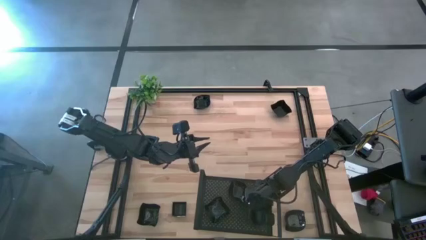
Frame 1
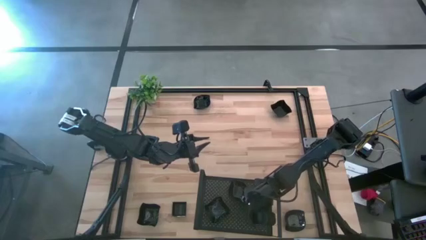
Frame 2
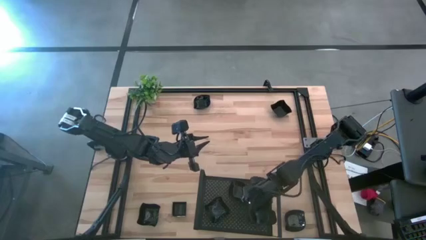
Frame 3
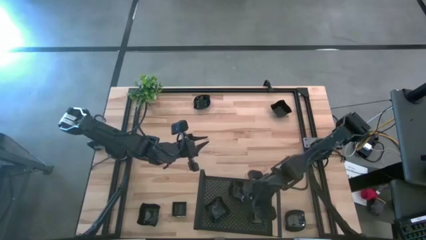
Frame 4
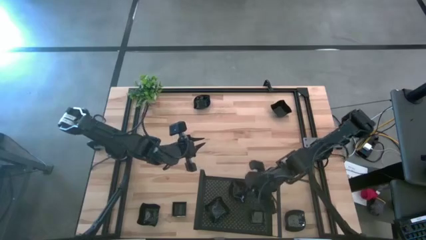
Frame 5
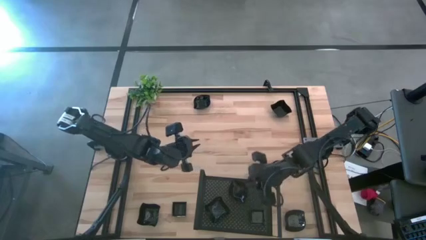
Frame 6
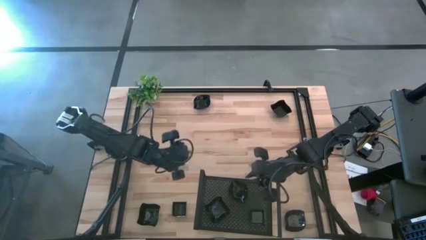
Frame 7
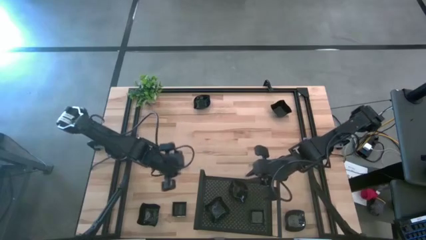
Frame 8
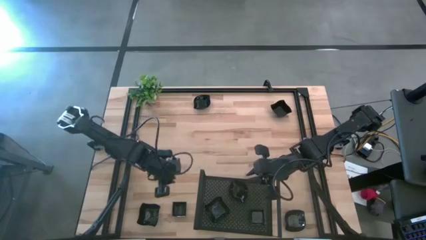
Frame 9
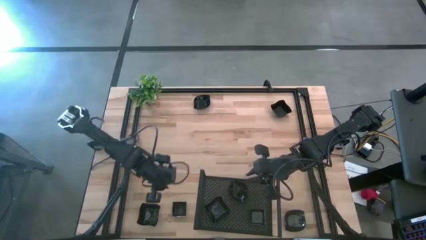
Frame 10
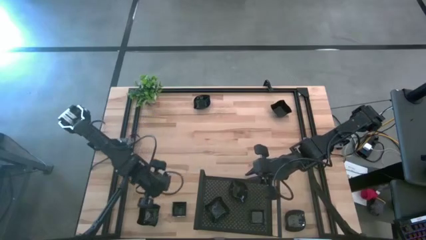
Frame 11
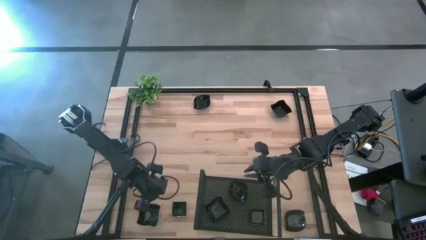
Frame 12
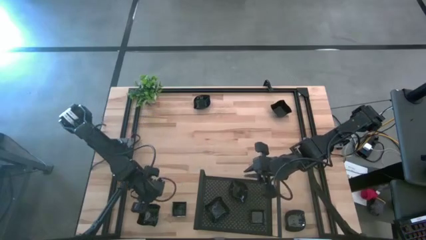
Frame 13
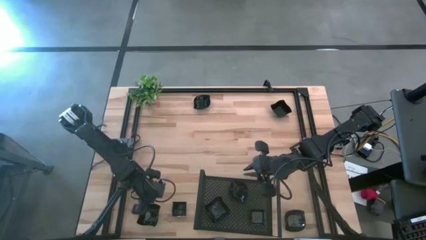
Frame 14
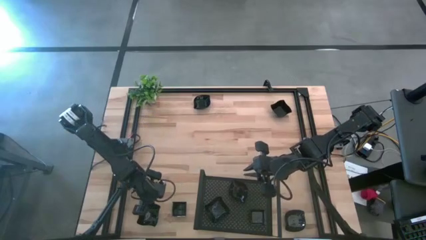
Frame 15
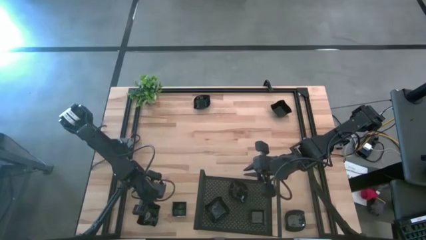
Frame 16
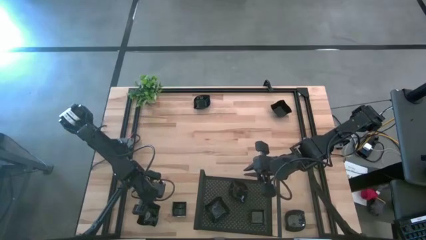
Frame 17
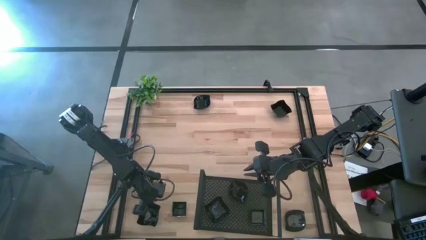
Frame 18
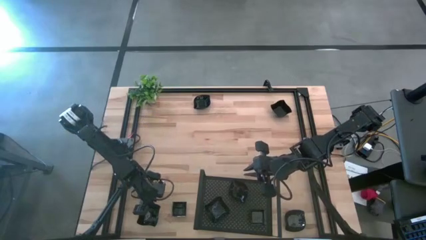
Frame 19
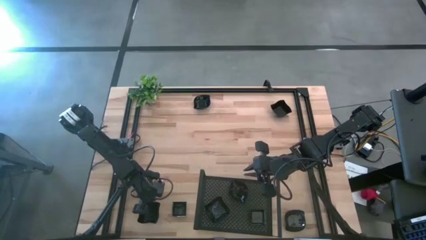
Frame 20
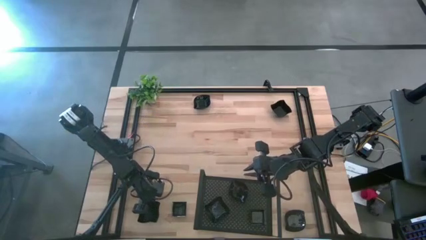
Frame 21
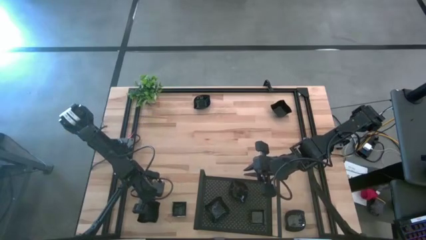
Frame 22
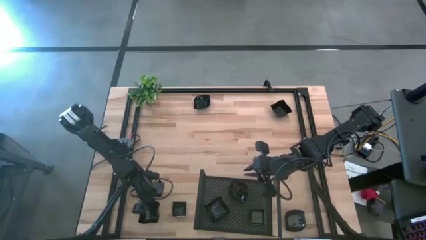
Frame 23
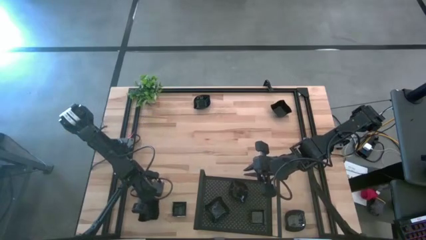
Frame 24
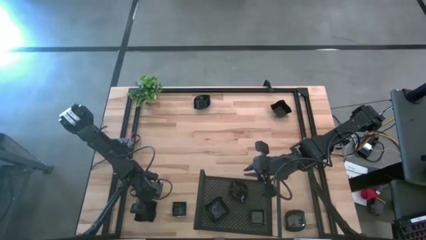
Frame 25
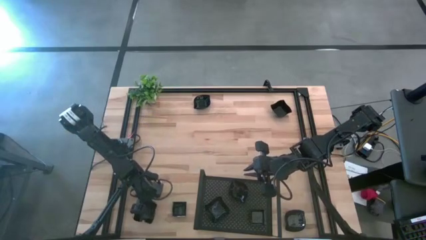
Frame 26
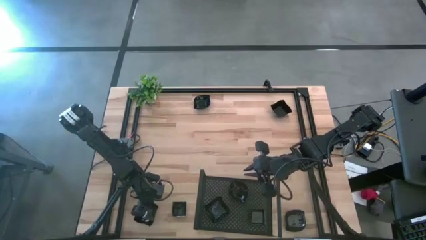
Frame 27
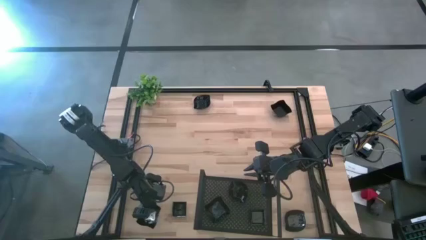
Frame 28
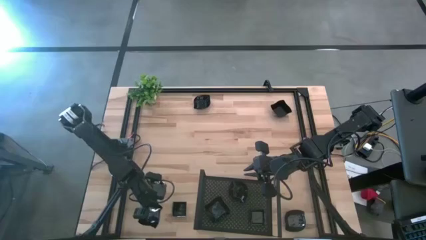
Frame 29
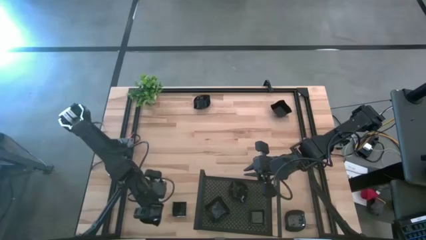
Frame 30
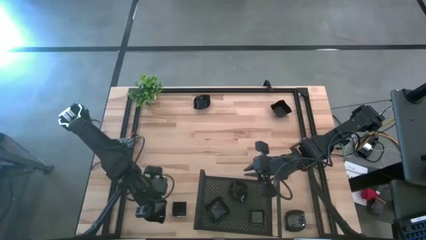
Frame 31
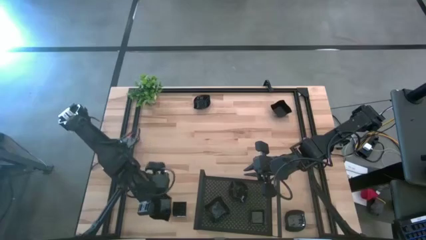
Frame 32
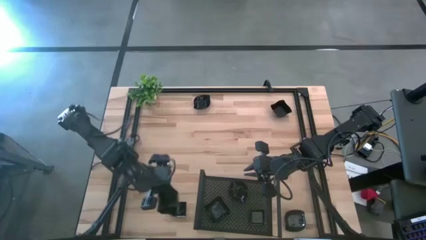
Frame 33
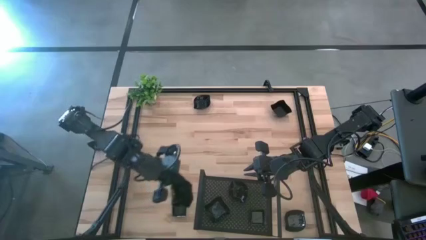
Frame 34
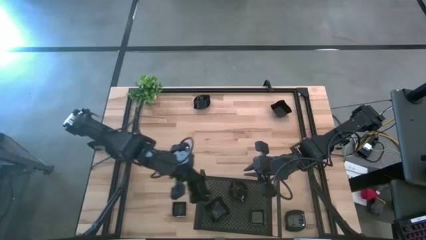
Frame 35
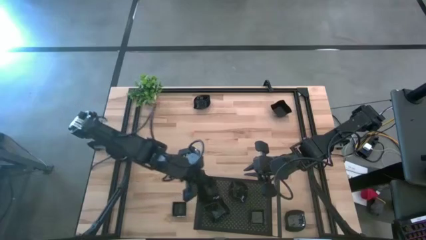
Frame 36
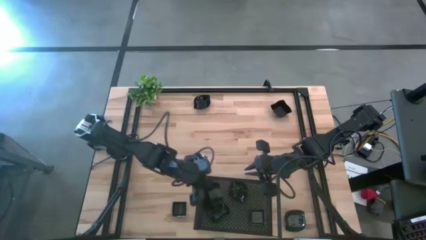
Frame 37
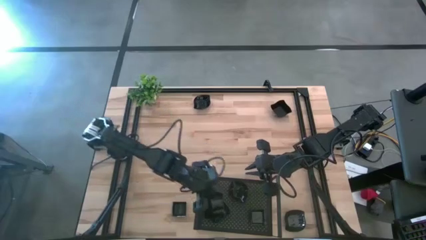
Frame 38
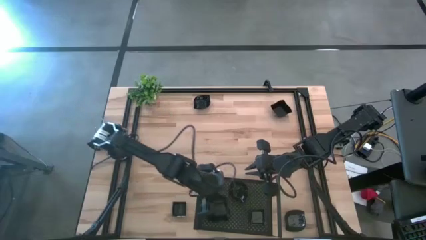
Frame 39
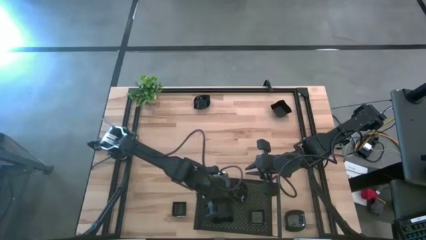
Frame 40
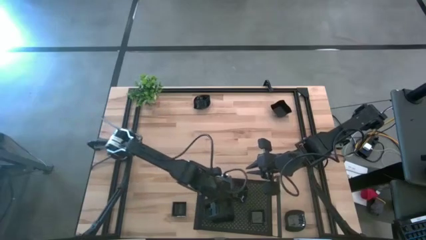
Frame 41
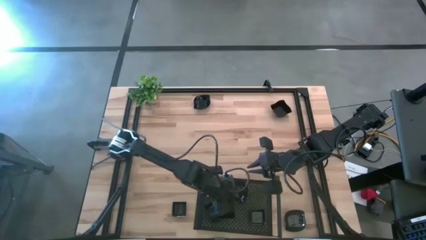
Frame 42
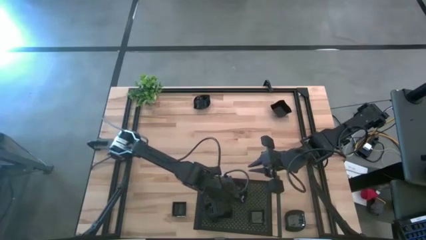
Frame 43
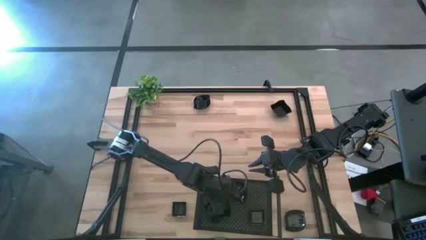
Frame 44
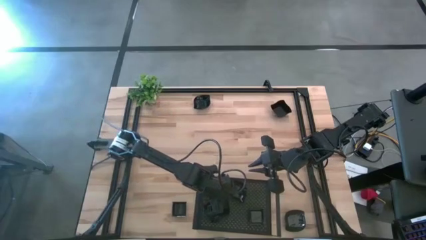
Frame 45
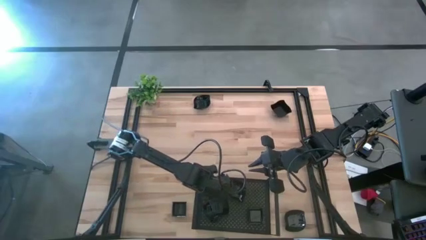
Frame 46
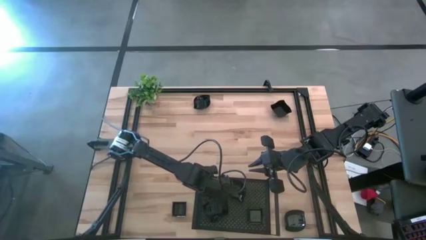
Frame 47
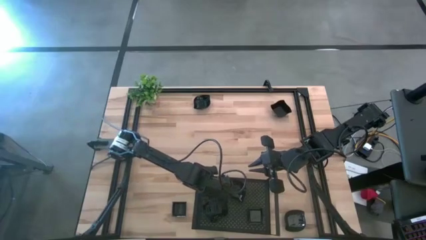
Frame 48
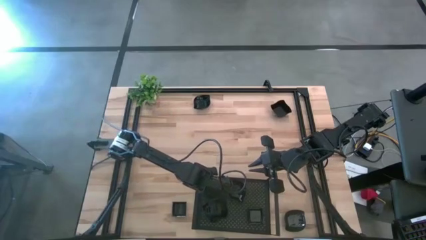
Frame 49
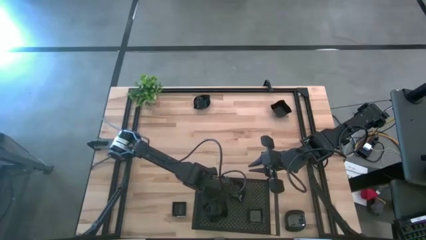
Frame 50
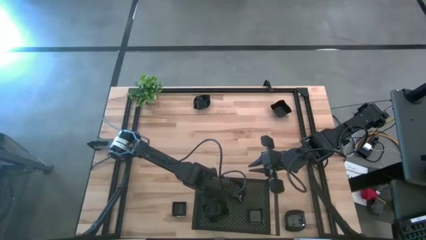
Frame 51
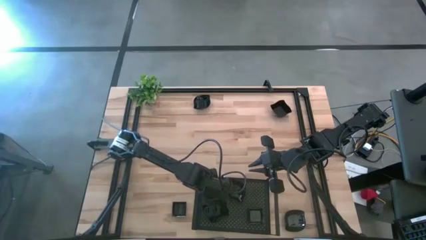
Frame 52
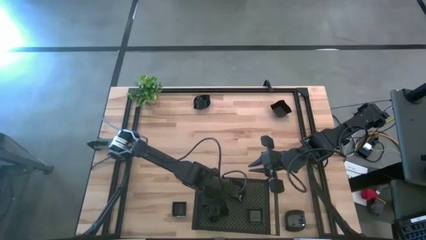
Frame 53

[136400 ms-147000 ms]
Task: Pick & Place Mini shaped plates
Stack the distorted square plate on top of the other distorted square plates on the shelf

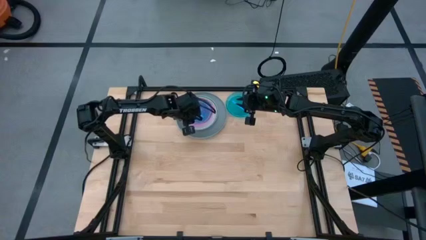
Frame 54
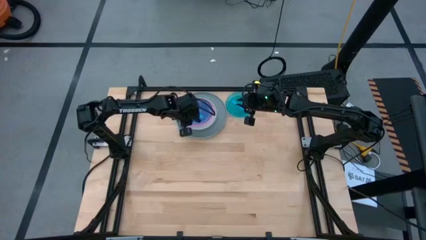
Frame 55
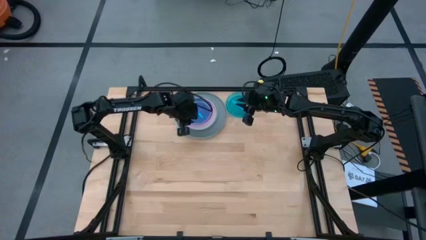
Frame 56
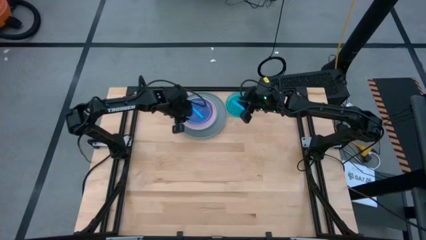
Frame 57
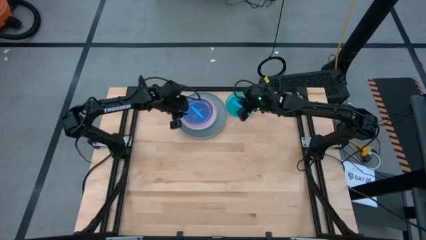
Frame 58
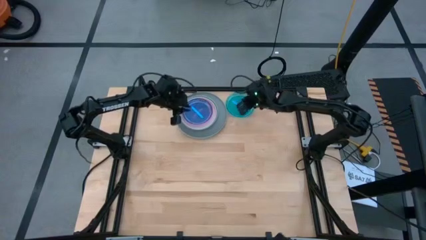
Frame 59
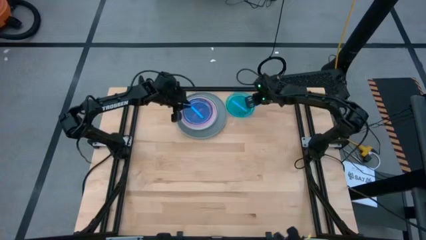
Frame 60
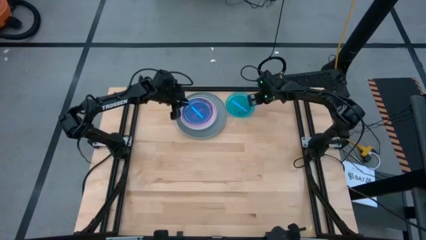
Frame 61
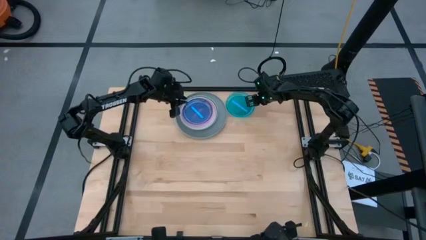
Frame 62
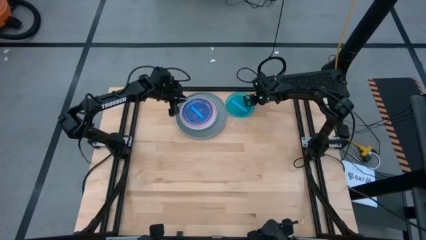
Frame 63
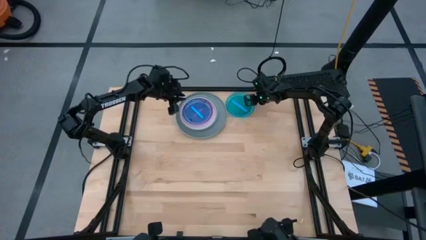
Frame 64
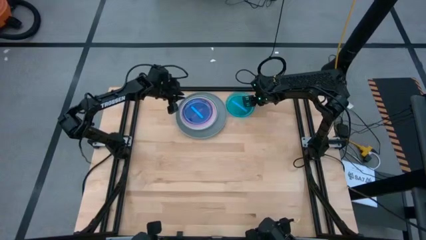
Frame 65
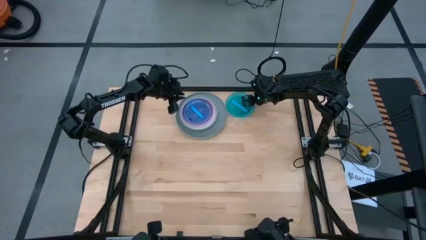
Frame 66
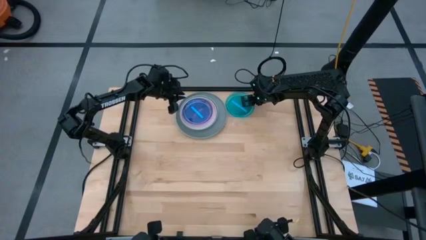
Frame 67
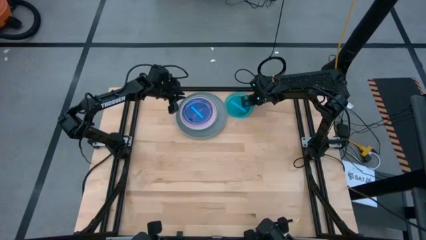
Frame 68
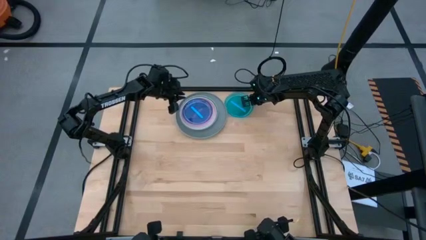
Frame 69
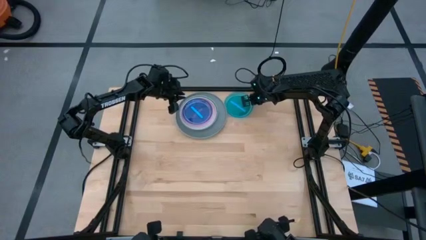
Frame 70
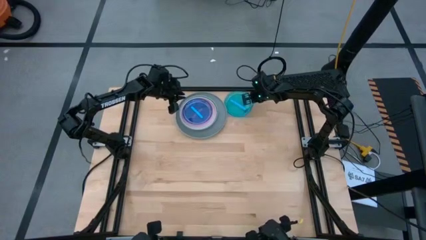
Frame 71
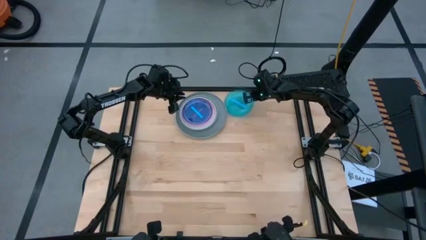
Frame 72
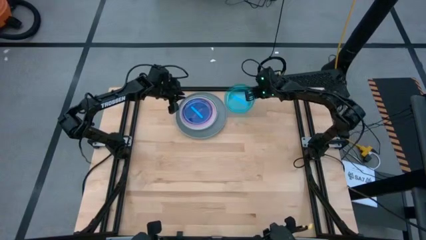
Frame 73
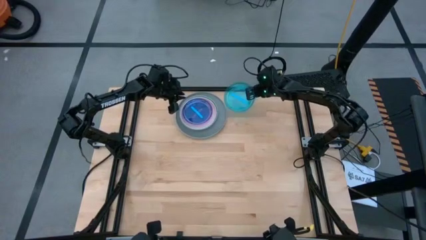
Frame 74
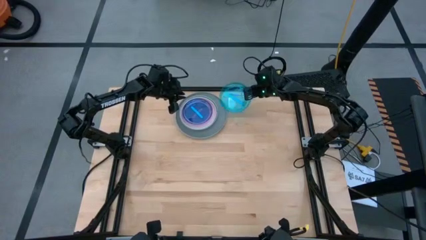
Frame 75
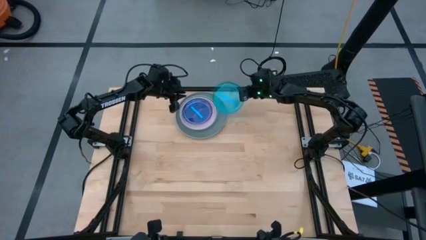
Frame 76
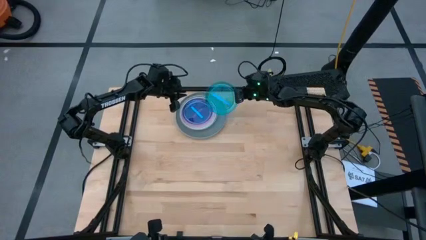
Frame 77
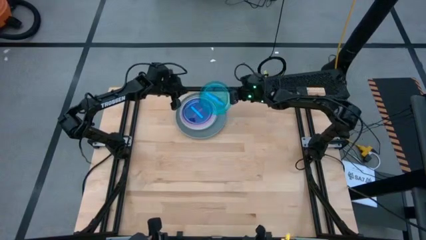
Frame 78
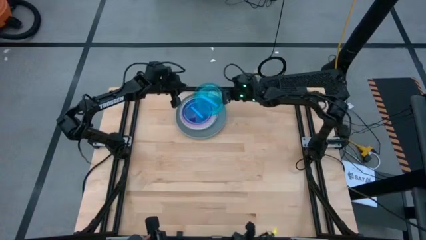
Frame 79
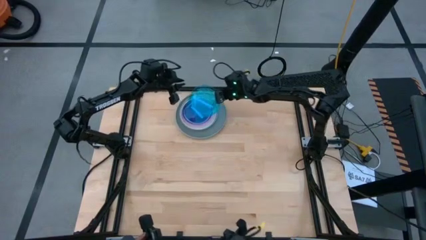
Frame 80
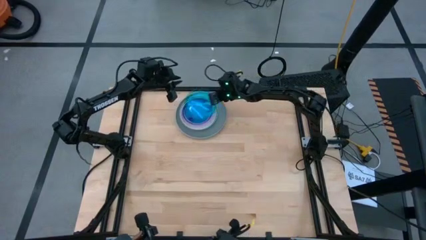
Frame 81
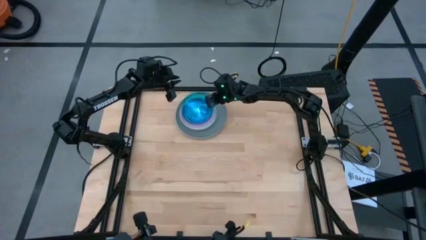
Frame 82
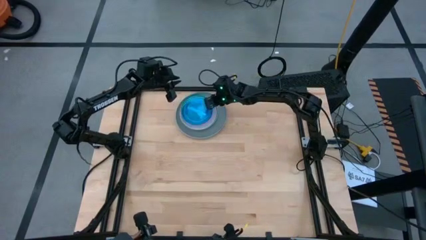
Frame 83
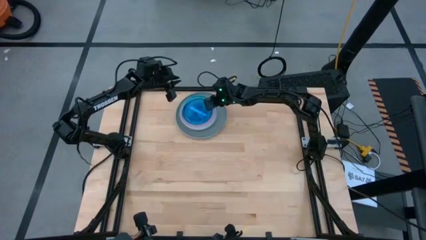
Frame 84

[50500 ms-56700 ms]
Task: Stack plastic plates
Stack the blue plate on top of the blue plate
